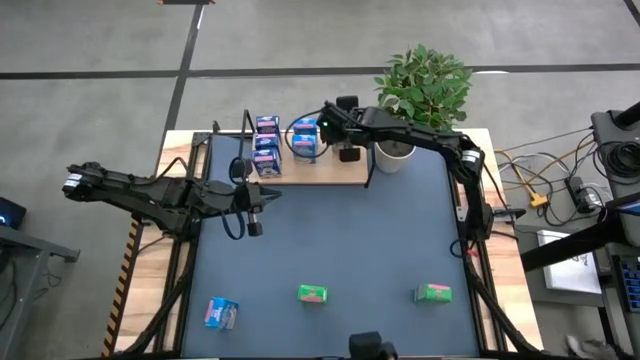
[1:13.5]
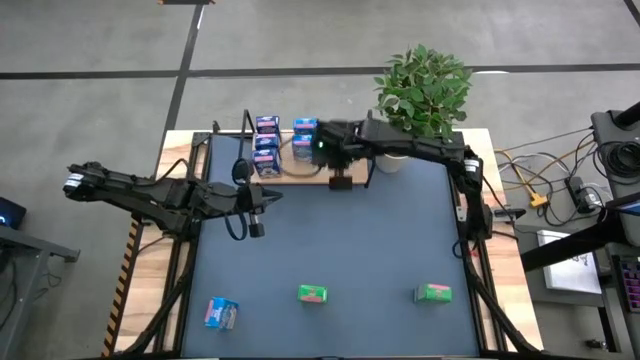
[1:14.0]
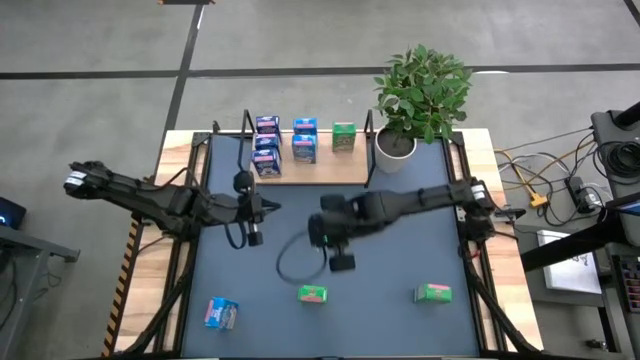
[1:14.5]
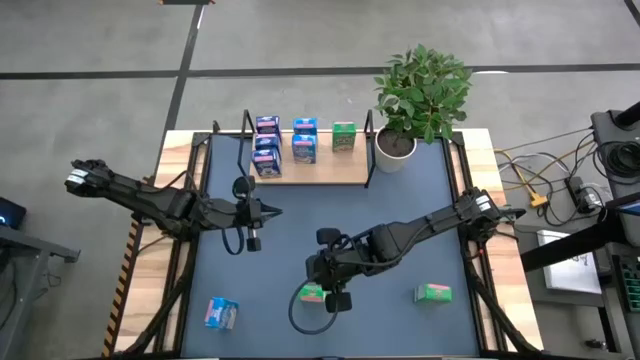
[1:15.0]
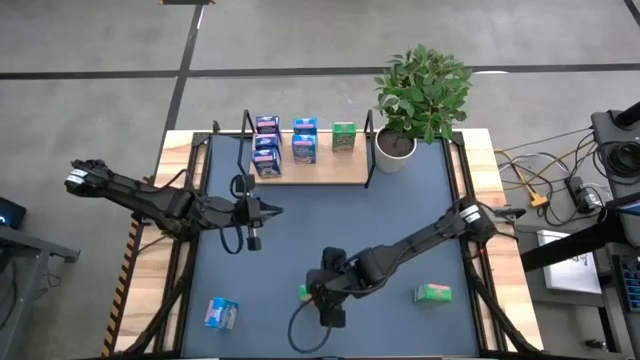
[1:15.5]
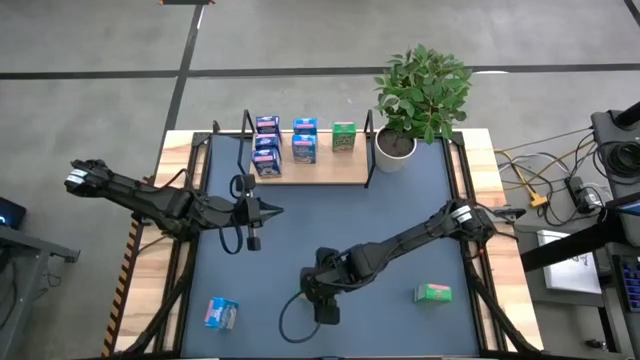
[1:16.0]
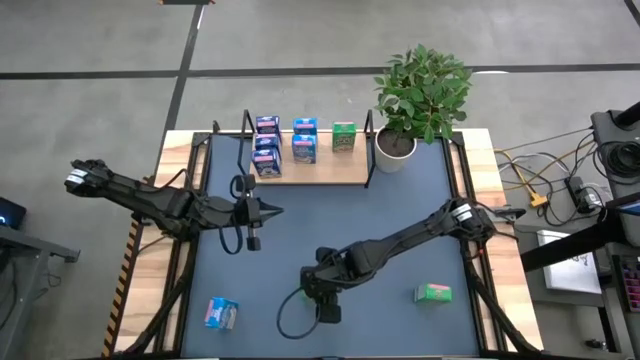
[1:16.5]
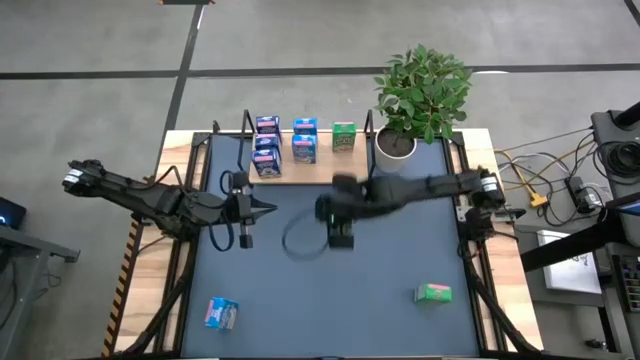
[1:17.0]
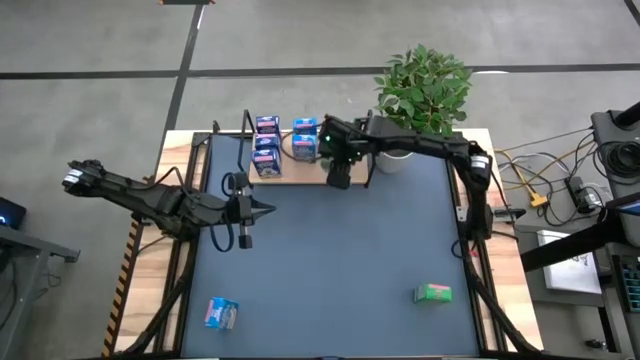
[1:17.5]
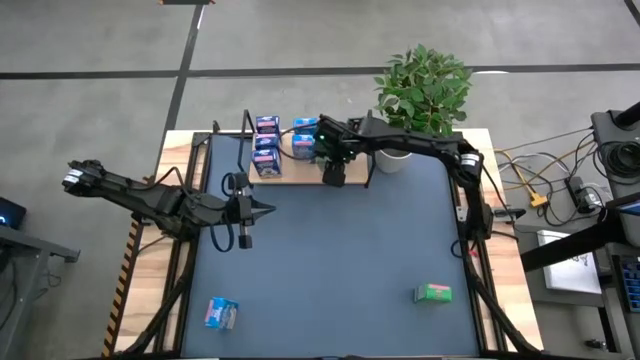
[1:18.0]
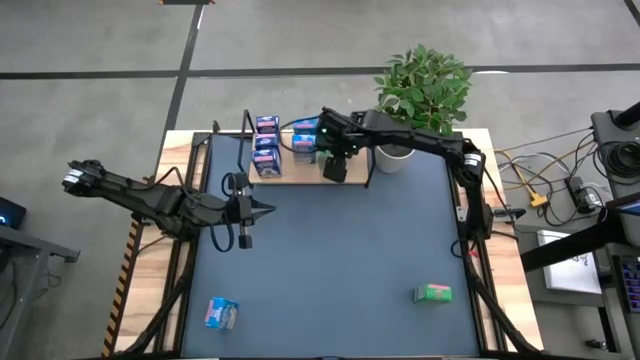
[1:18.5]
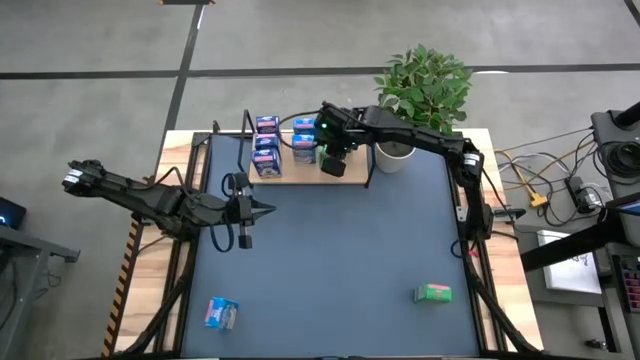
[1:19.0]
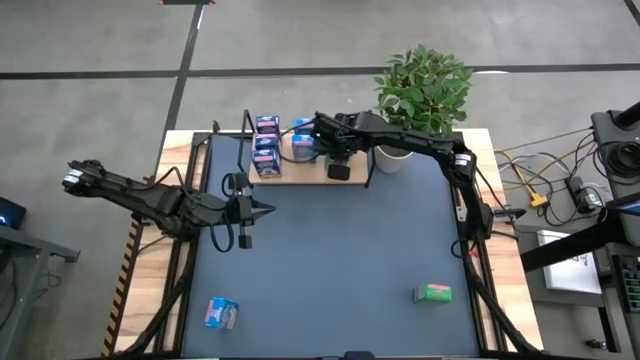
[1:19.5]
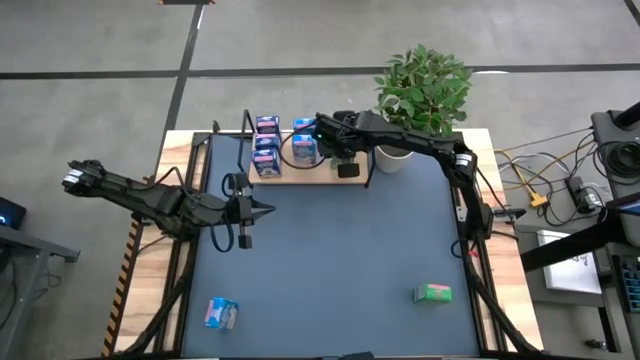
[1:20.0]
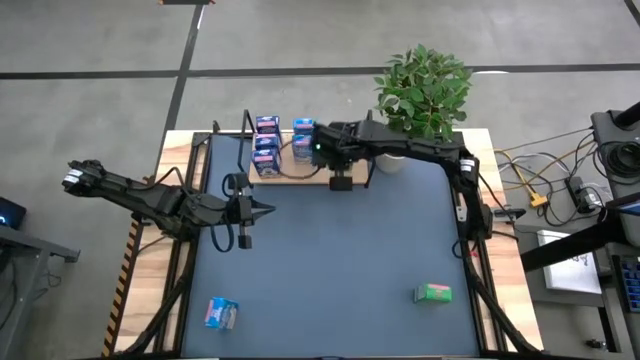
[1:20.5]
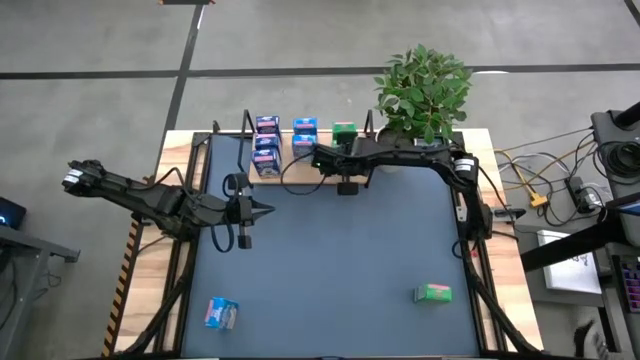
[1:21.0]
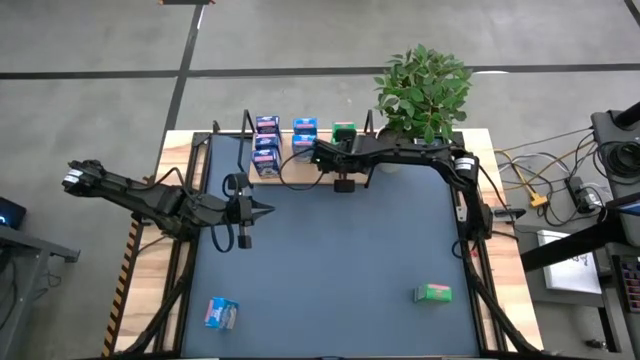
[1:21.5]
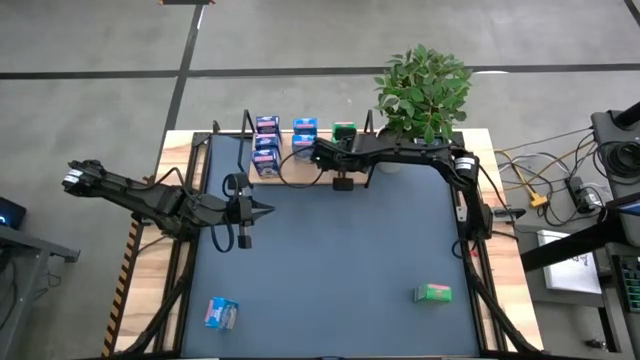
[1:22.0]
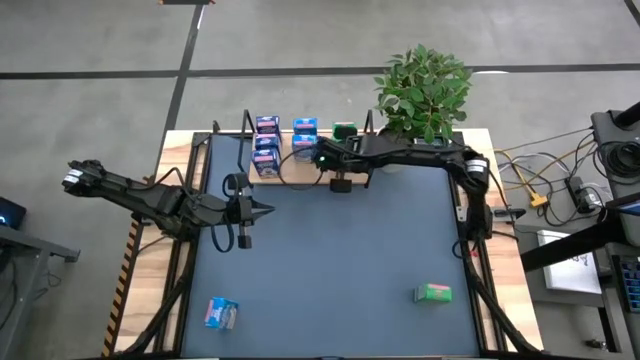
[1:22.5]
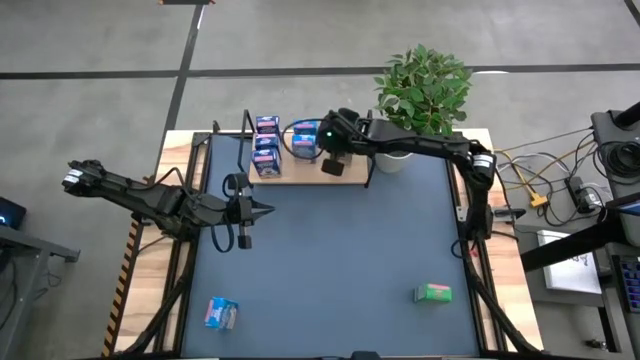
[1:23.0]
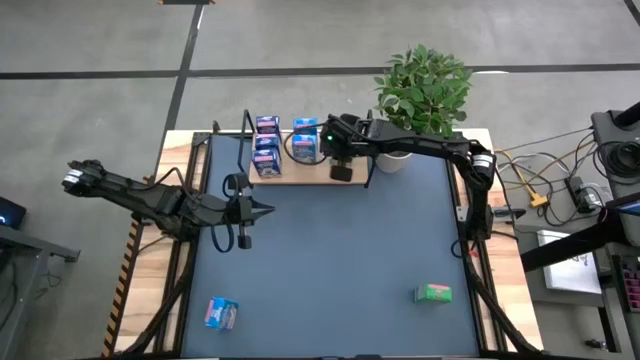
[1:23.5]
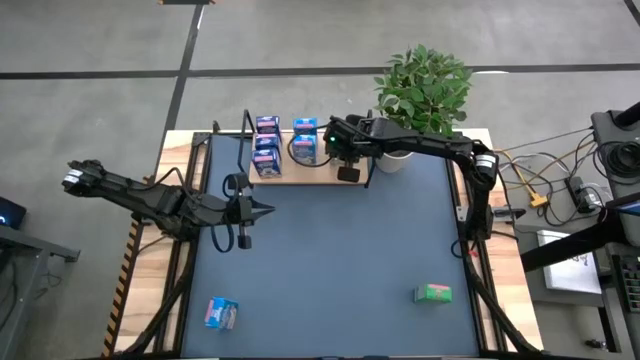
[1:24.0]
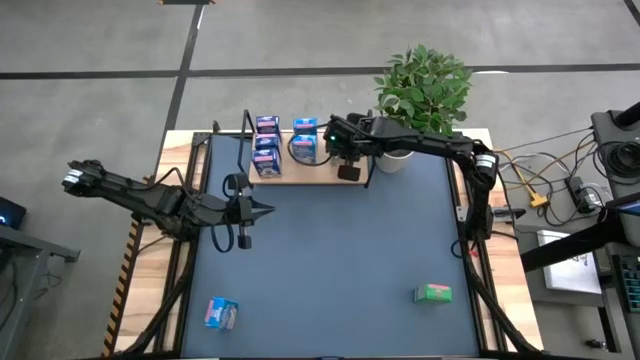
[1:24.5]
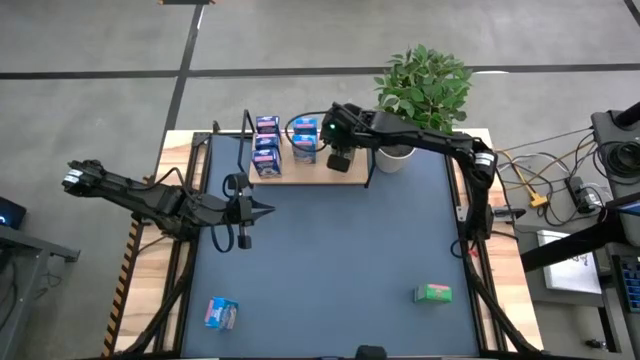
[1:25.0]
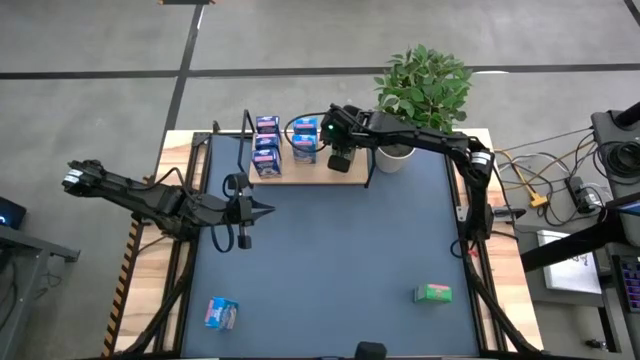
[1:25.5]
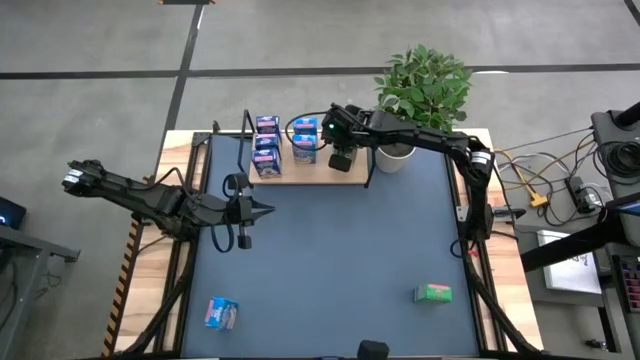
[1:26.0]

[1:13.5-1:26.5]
Task: Stack cereal on shelf
Put the left green cereal box on the shelf aligned with the other green cereal box

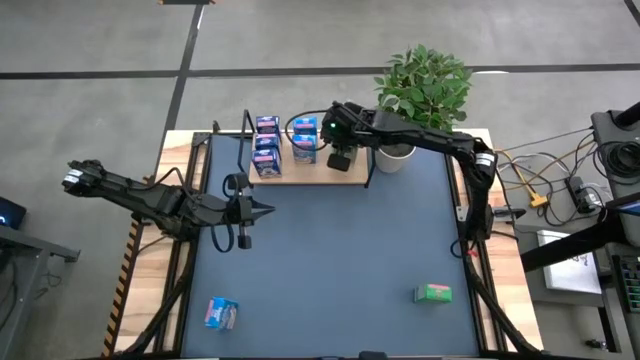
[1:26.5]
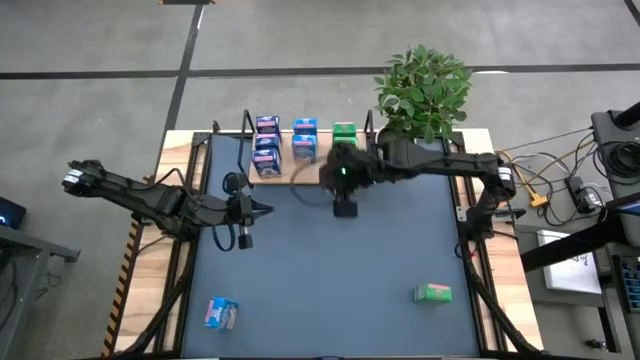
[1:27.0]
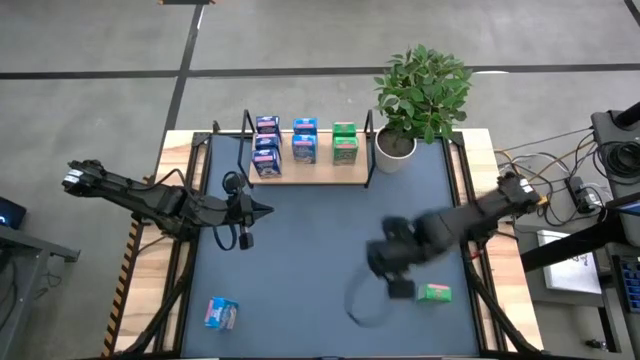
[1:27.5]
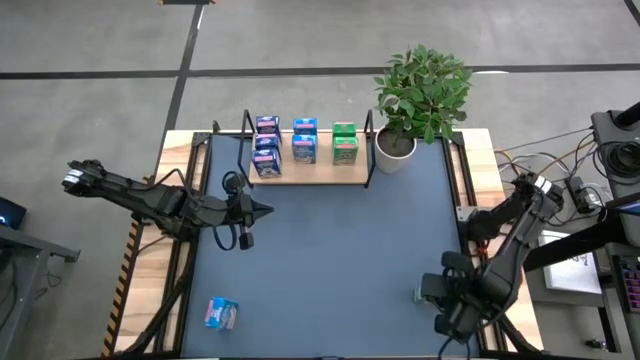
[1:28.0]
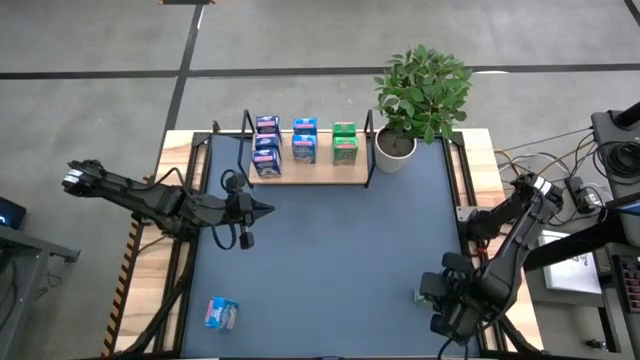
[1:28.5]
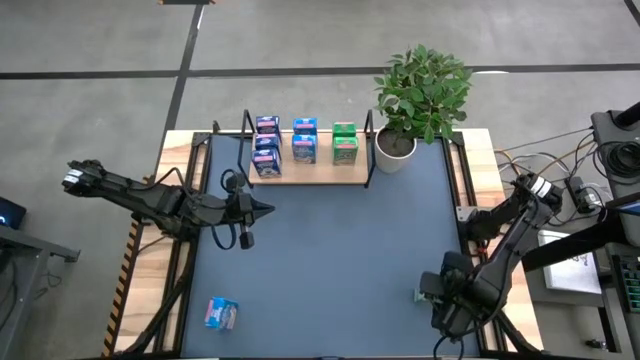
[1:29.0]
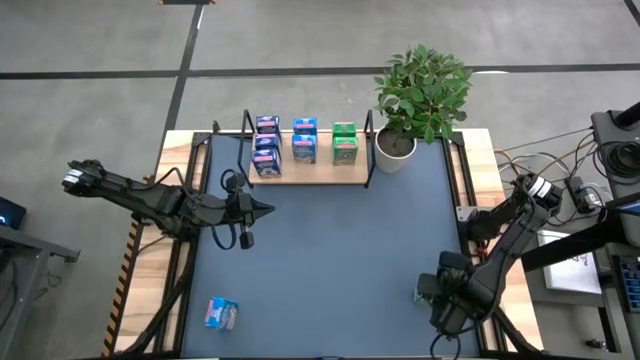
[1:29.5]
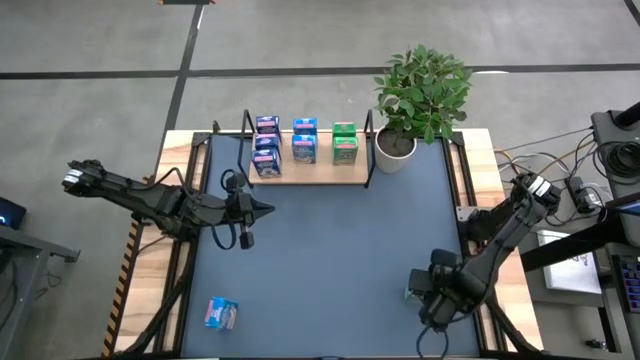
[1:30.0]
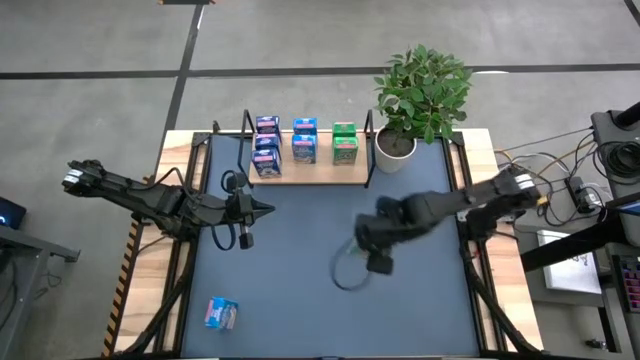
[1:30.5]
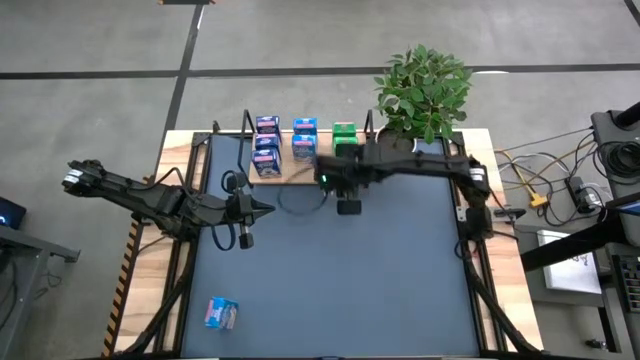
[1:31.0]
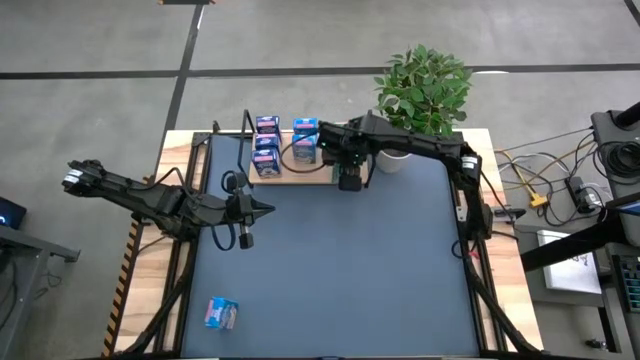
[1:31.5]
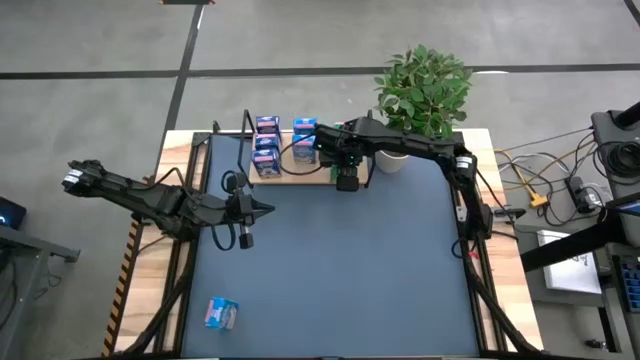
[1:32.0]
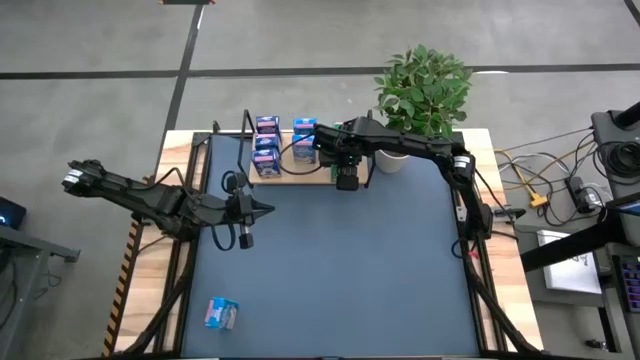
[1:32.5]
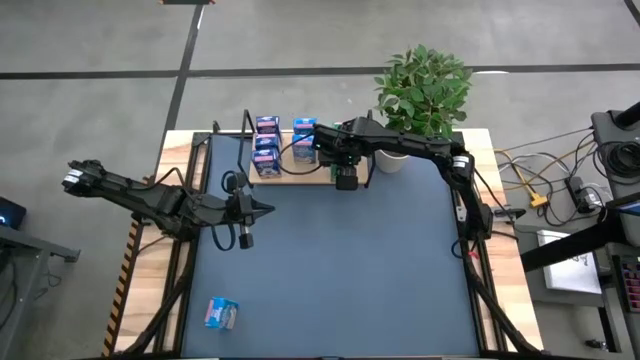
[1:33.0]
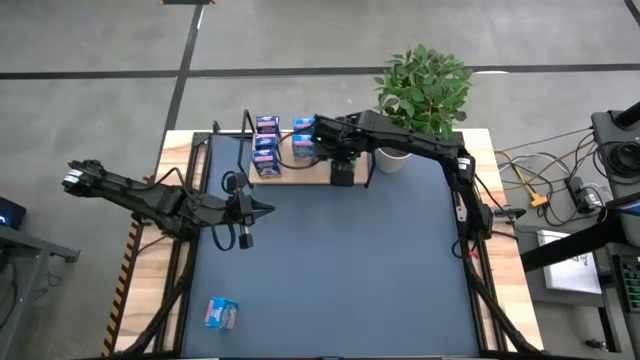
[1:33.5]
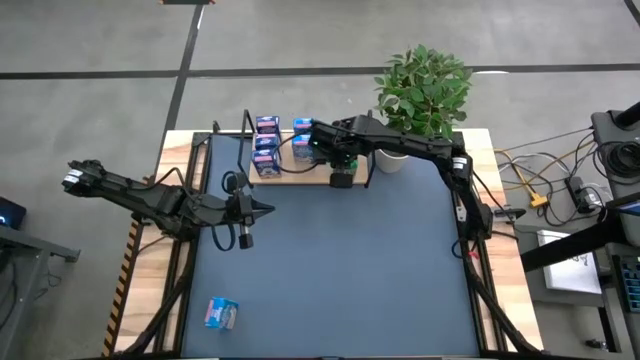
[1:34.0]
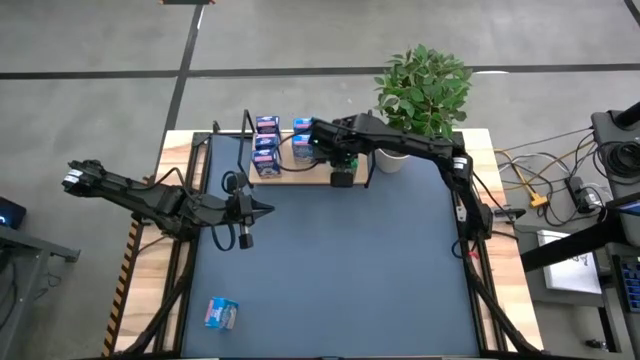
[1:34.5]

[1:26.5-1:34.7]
Put the green cereal box on the shelf aligned with the other green cereal boxes
